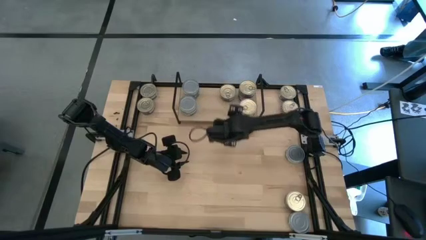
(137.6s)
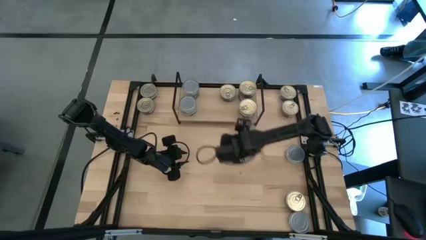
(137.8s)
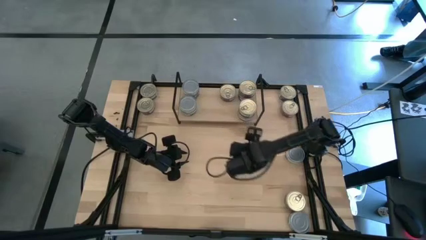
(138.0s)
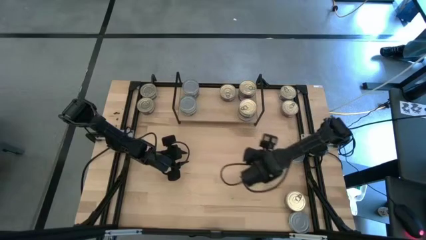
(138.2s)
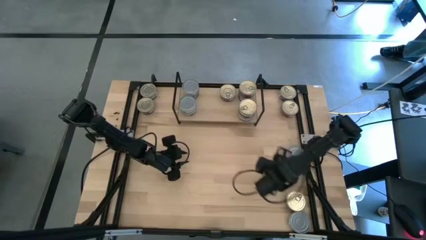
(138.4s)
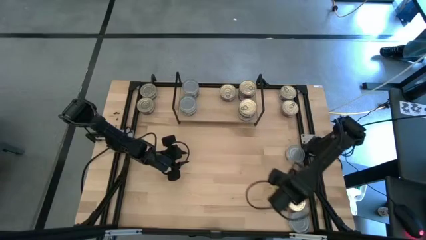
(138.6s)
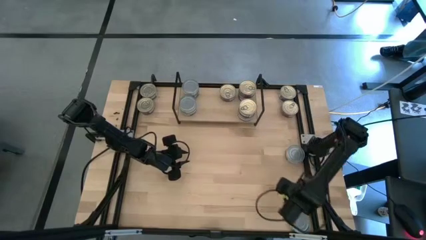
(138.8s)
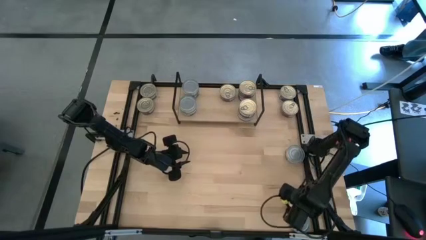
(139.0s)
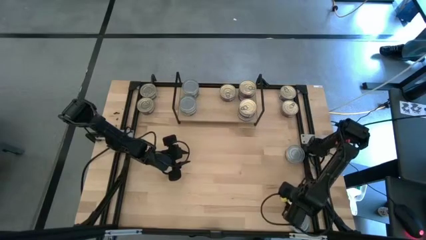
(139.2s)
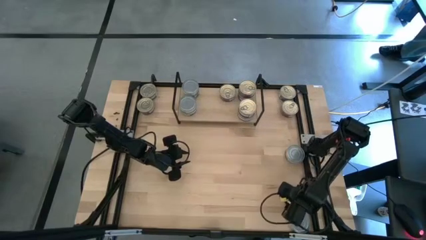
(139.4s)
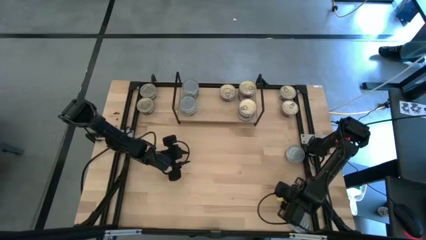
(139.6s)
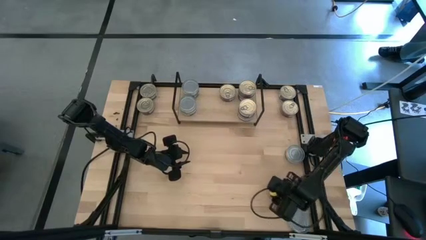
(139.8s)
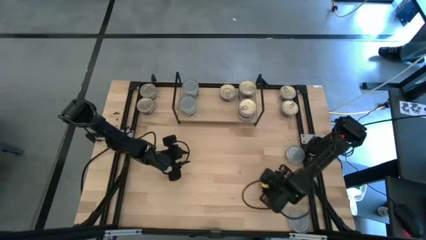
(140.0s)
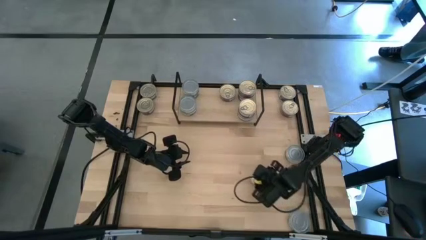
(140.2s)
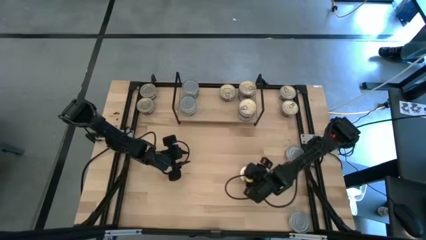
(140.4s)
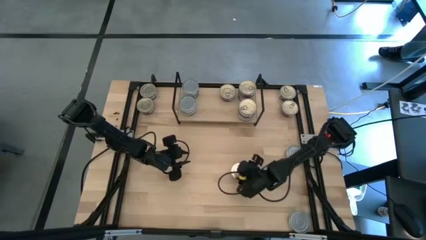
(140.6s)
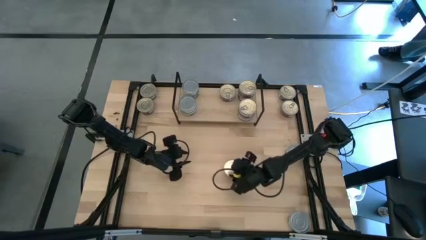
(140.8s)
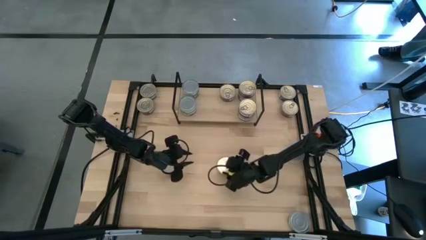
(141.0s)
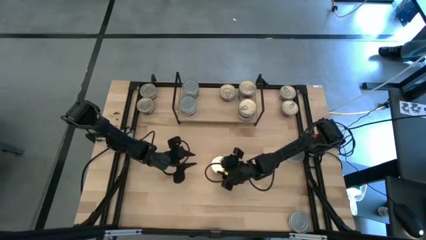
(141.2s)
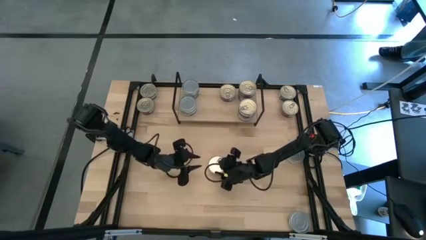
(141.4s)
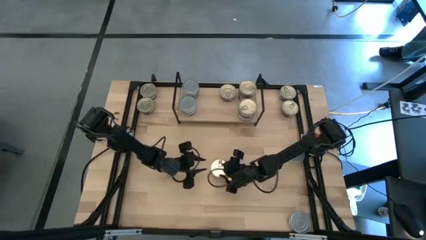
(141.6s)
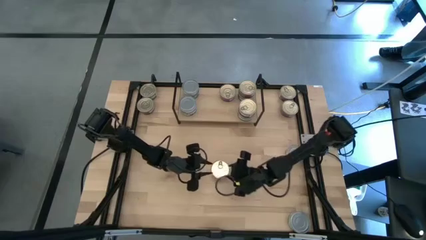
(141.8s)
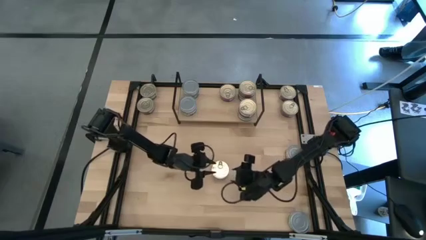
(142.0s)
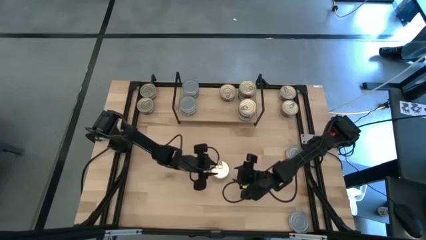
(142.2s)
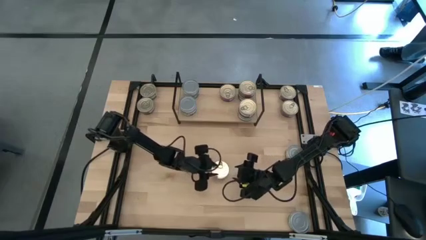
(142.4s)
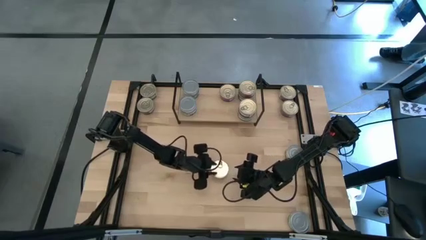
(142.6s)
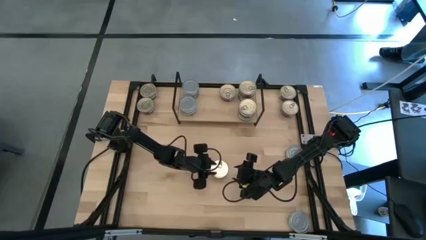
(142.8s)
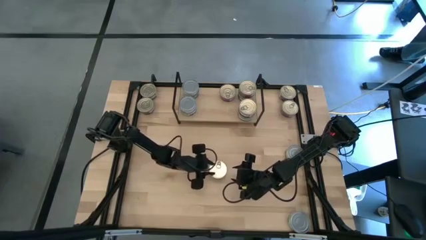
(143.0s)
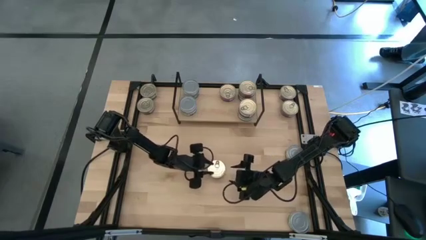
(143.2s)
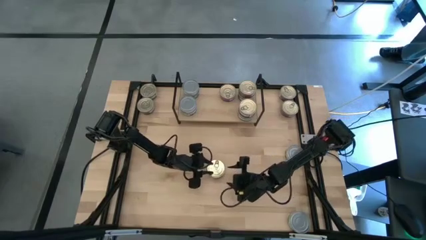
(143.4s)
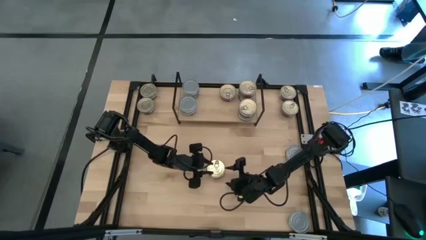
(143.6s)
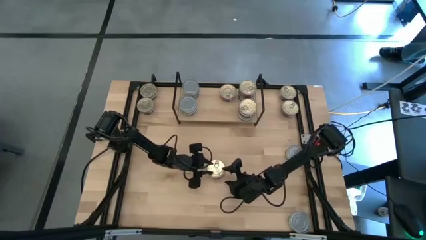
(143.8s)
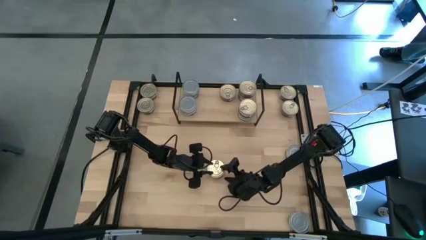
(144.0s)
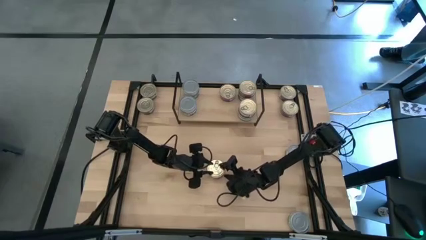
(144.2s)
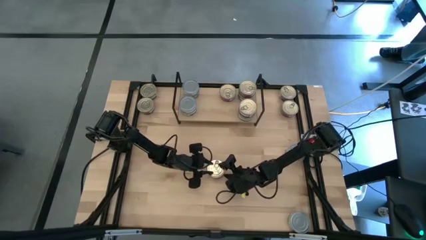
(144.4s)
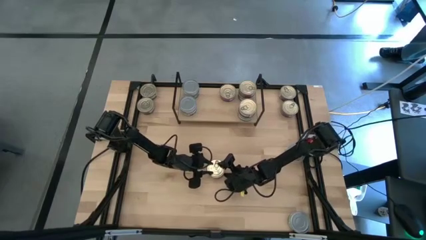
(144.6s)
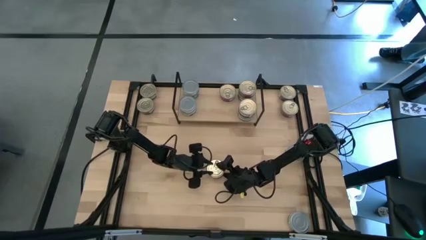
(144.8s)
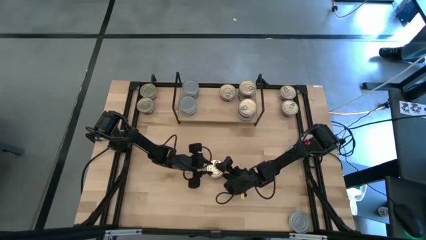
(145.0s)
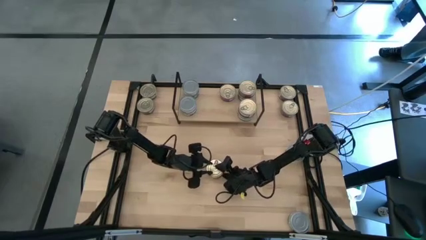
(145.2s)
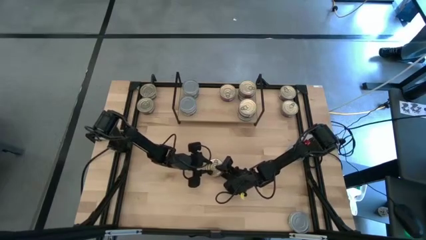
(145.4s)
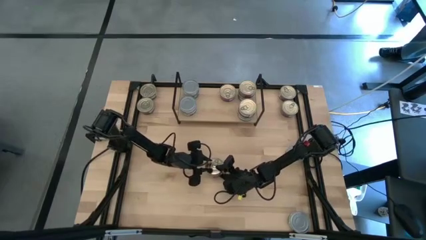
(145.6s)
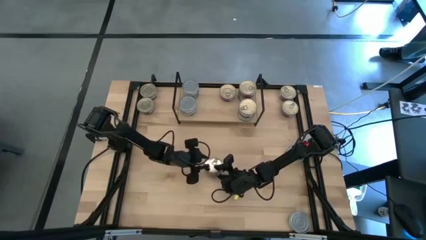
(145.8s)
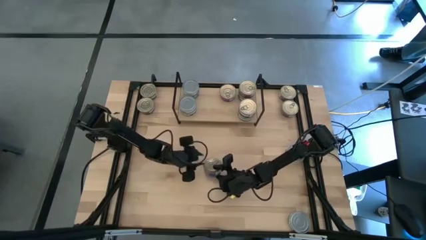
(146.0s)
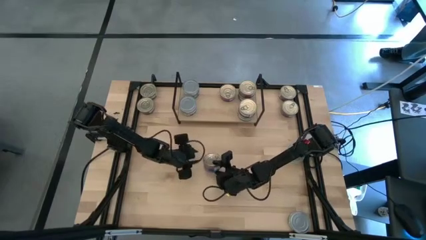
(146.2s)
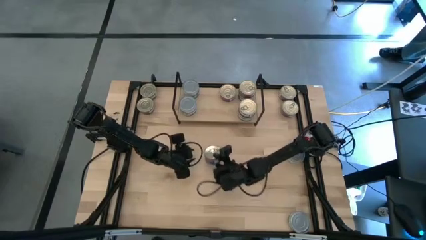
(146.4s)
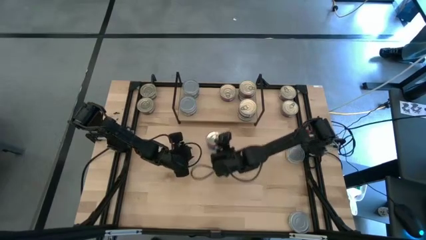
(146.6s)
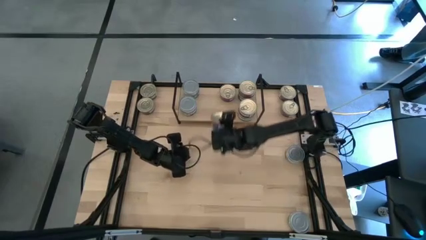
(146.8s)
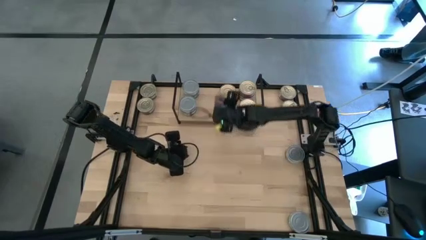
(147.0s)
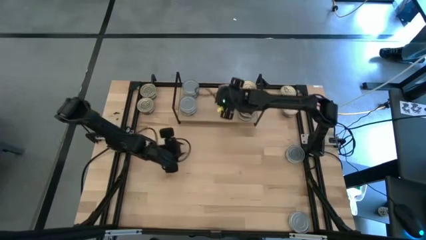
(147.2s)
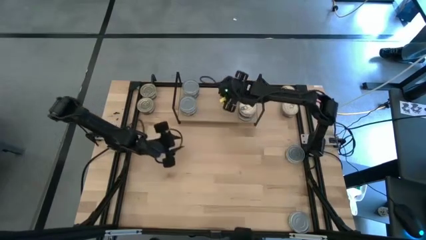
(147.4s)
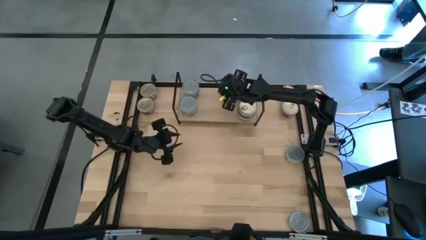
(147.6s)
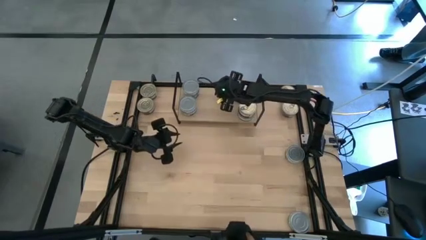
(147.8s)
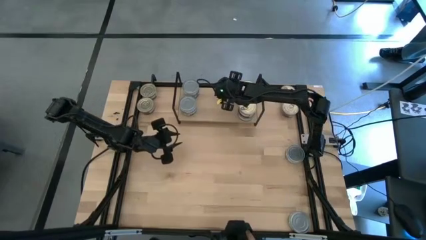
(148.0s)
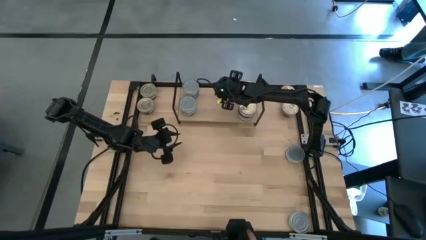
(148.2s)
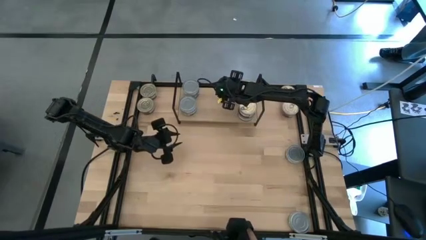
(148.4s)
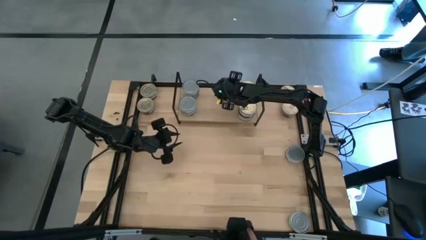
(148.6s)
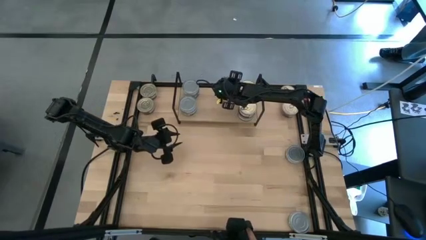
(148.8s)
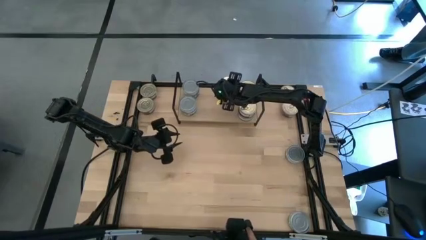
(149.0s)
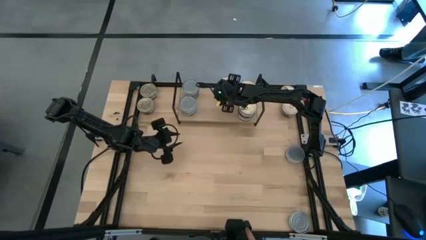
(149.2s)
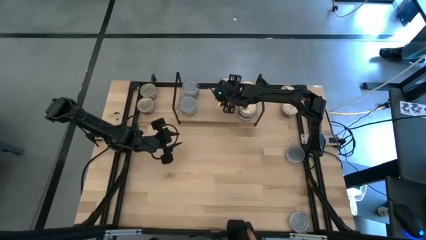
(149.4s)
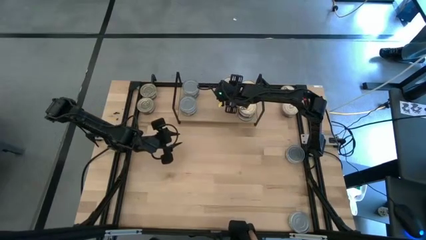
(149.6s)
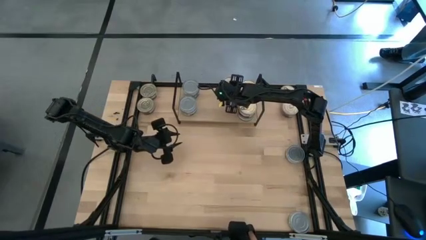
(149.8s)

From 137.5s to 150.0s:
Task: Stack canned seafood by type on shelf
Stack the blue pink tuna can on top of the other blue pink tuna can on the shelf

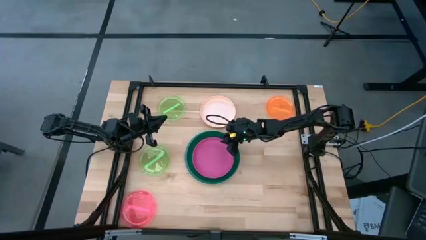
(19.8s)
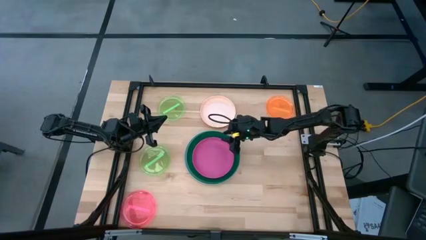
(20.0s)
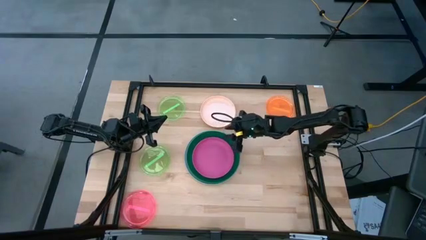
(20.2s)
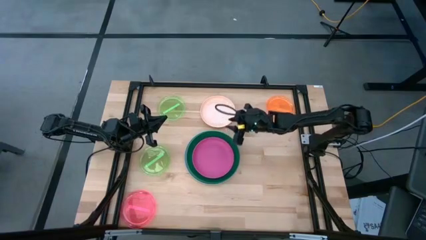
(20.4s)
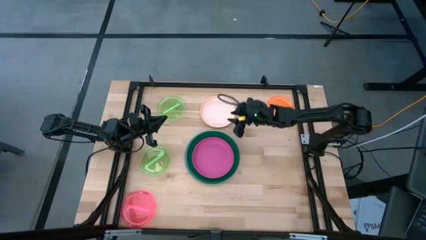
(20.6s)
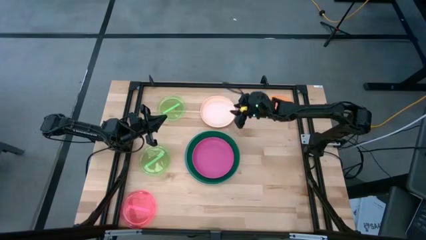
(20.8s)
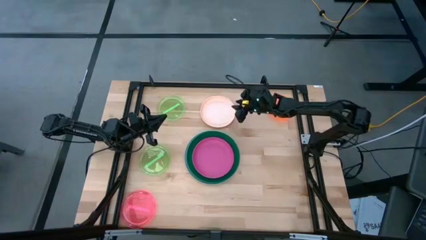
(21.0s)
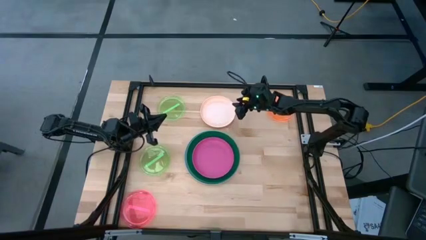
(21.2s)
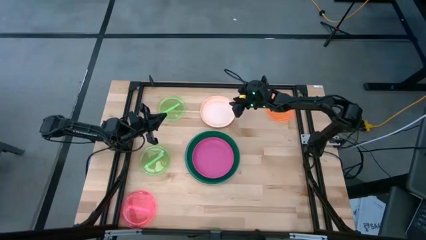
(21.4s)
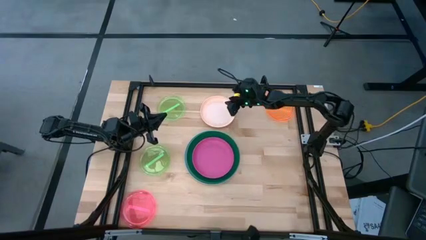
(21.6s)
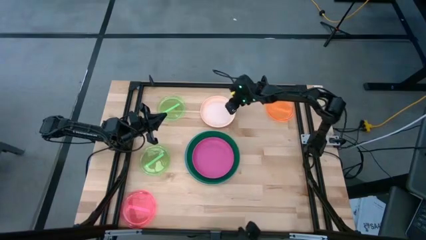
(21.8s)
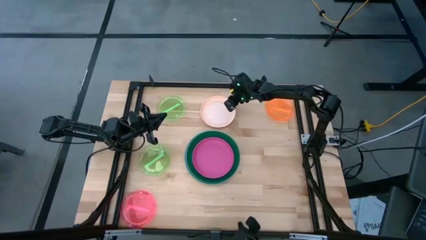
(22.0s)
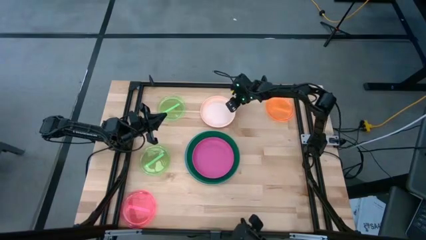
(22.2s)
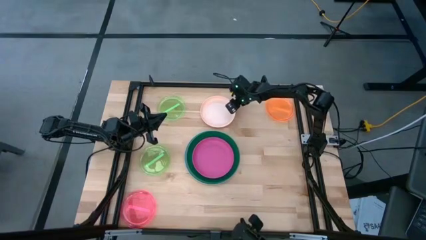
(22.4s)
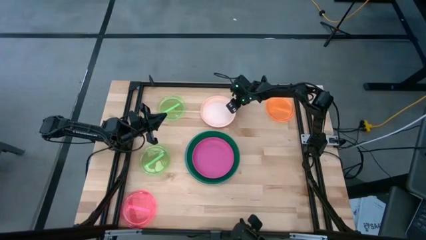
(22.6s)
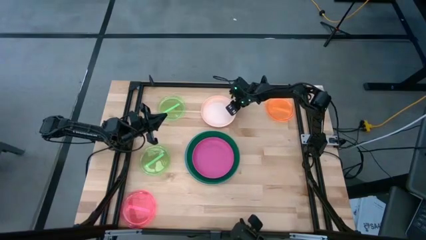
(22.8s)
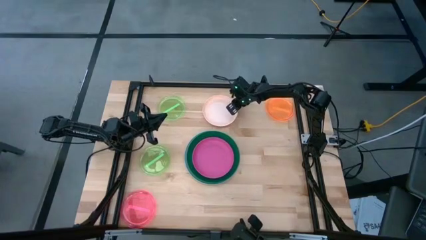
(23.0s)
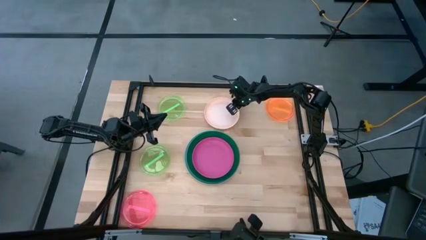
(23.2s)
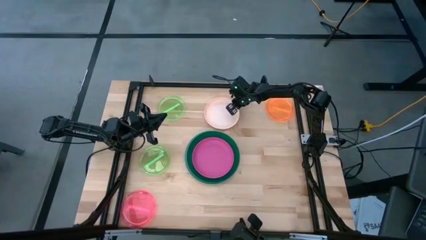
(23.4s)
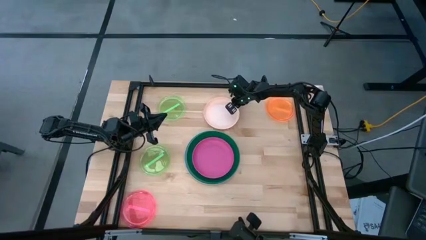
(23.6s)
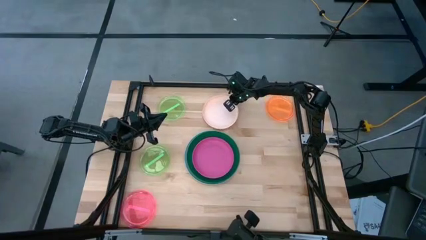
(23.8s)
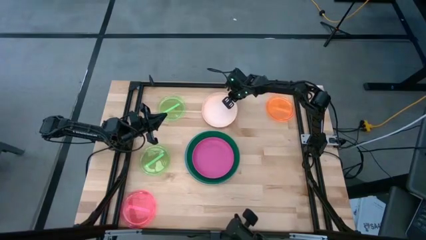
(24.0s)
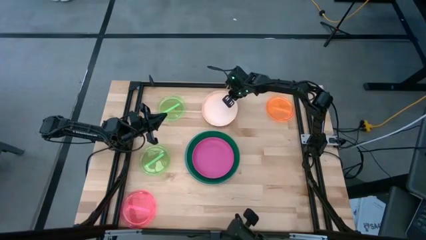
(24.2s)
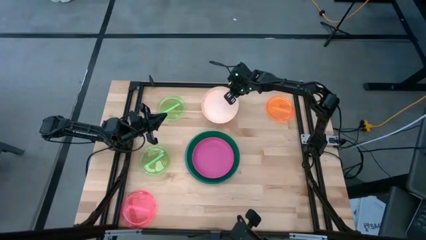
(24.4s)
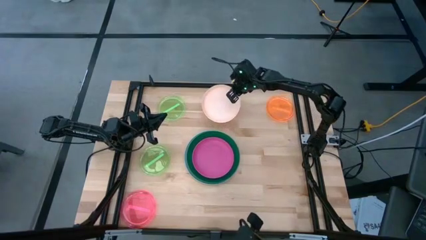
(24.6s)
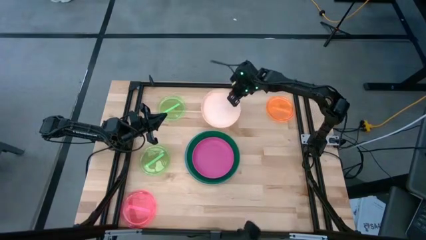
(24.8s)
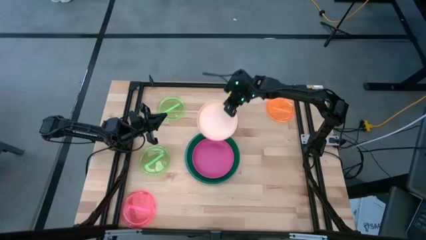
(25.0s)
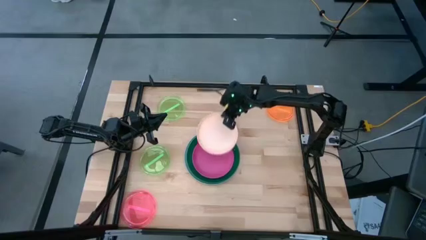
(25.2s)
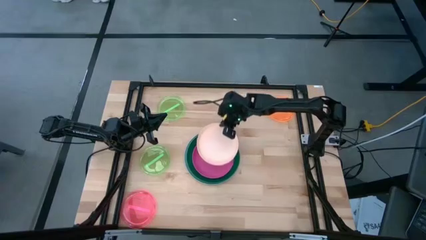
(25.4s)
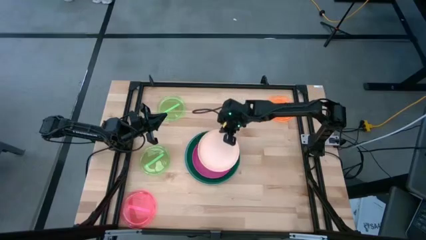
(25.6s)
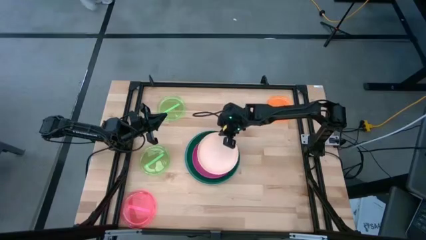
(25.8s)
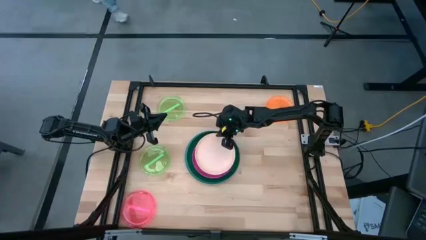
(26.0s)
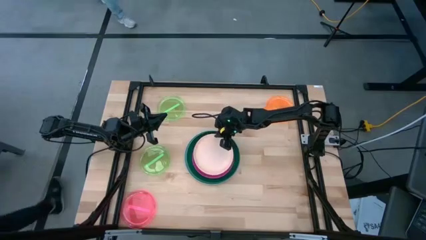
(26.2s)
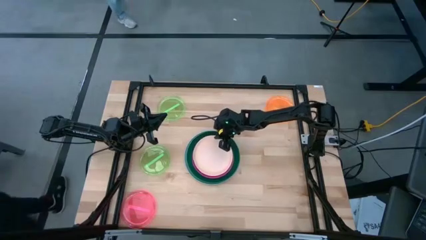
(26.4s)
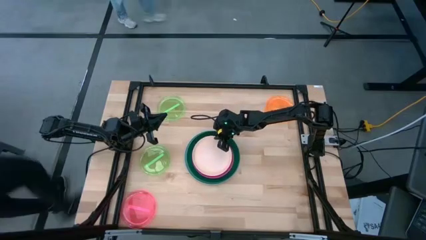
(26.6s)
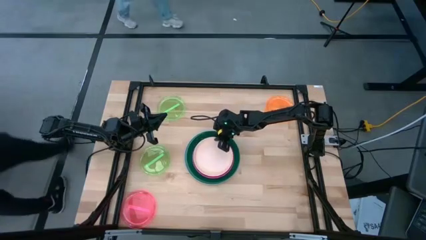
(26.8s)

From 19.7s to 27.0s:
Task: Stack plastic plates
Stack the light orange plate on top of the pink plate
